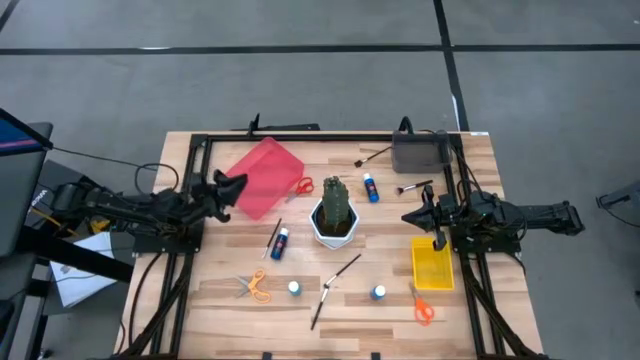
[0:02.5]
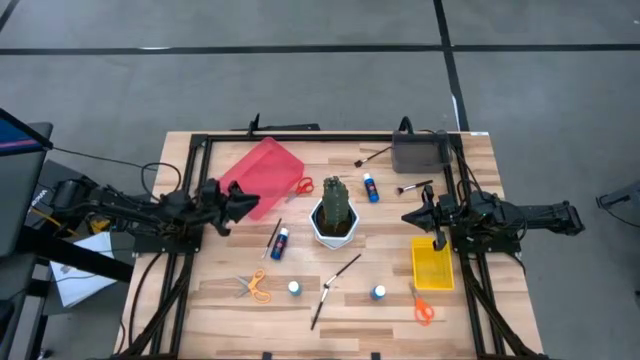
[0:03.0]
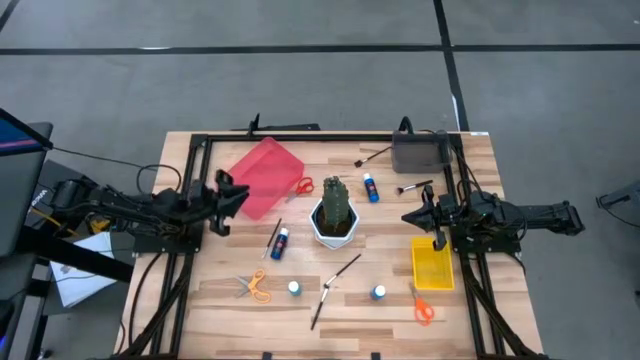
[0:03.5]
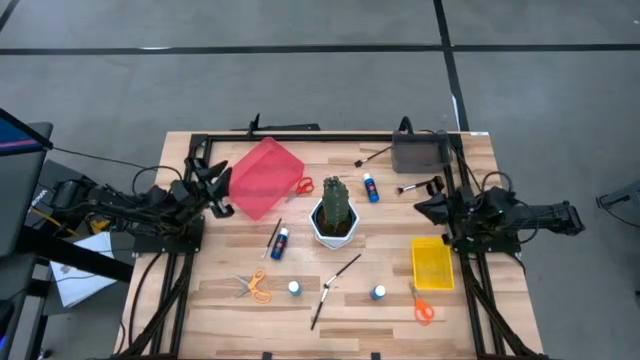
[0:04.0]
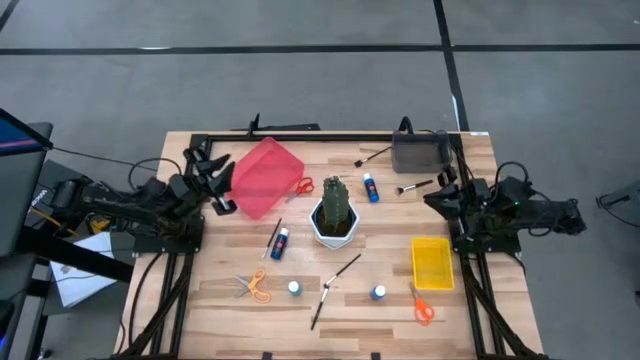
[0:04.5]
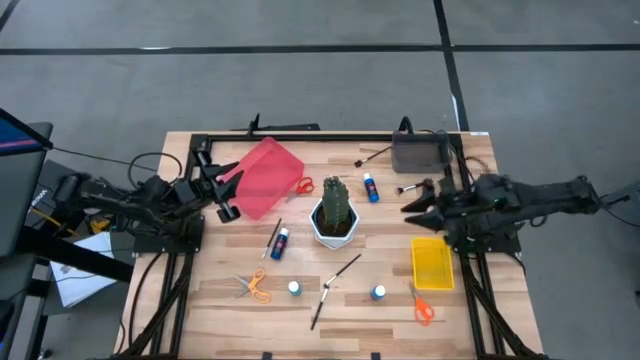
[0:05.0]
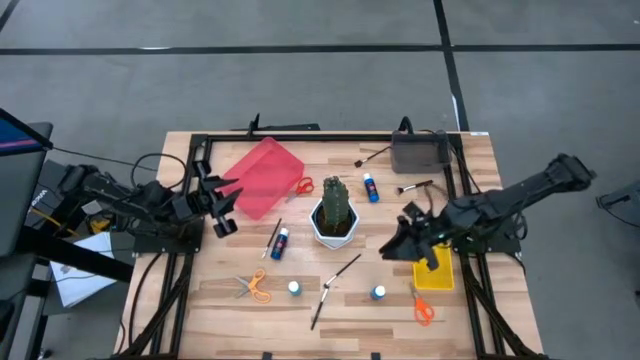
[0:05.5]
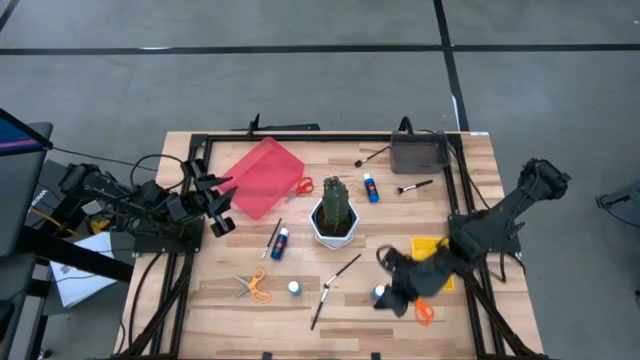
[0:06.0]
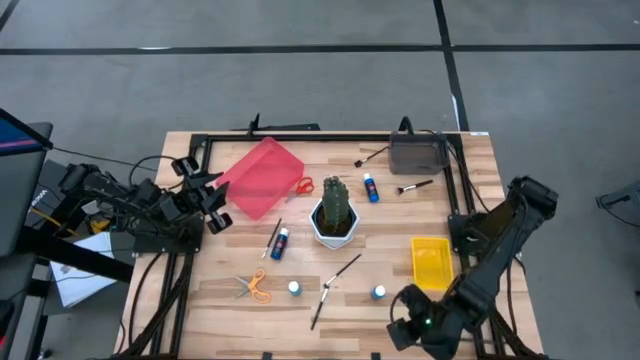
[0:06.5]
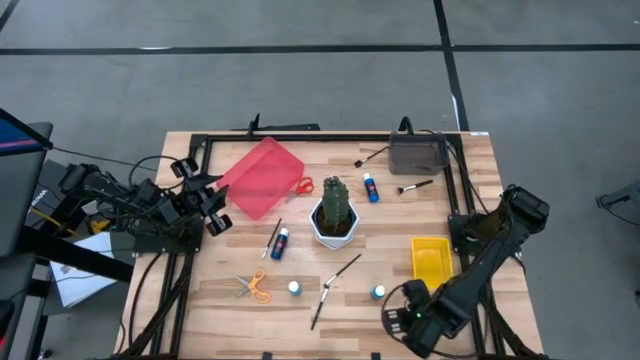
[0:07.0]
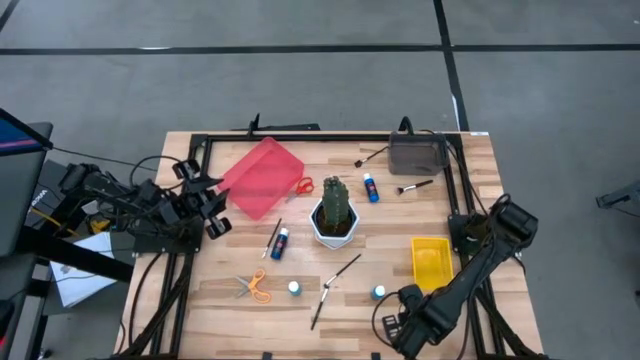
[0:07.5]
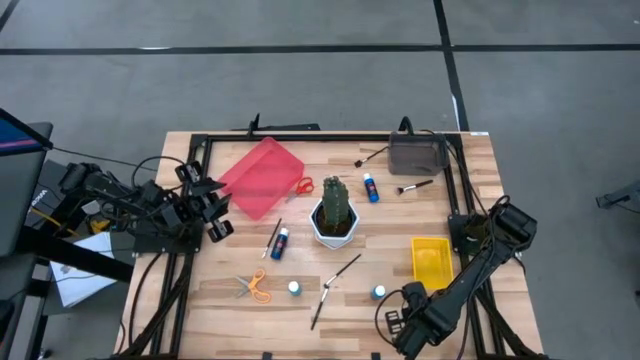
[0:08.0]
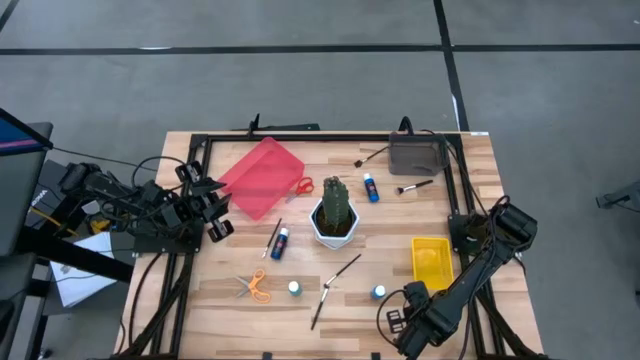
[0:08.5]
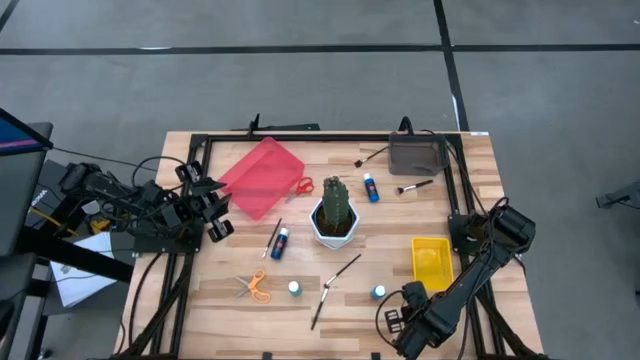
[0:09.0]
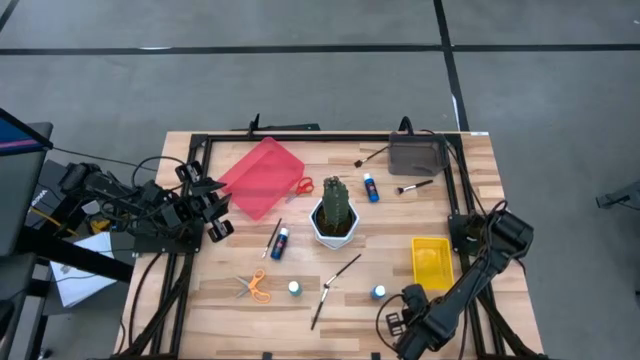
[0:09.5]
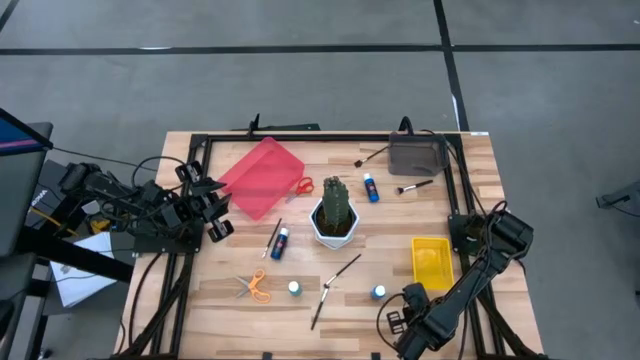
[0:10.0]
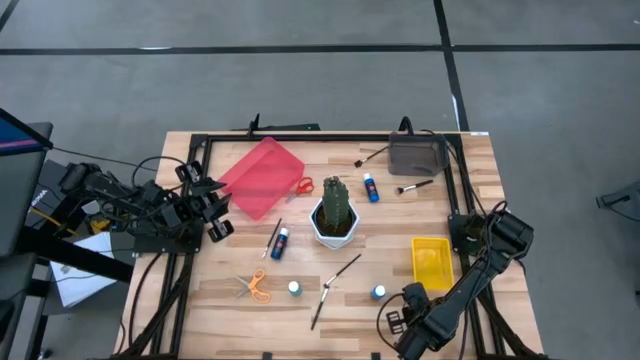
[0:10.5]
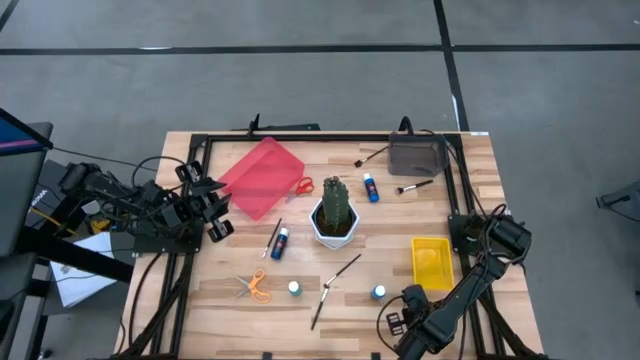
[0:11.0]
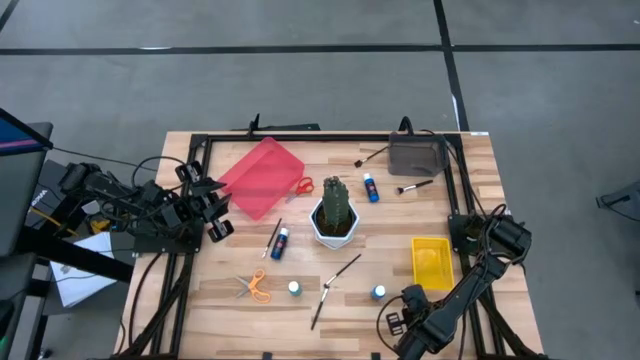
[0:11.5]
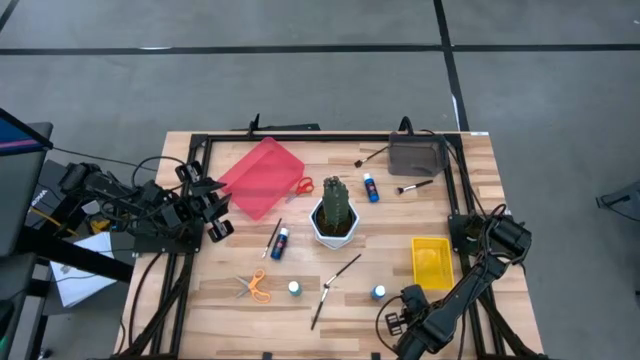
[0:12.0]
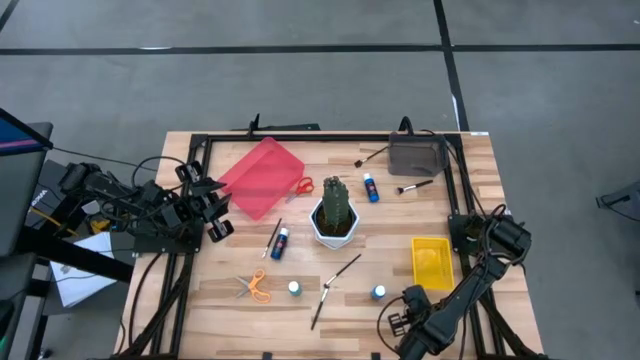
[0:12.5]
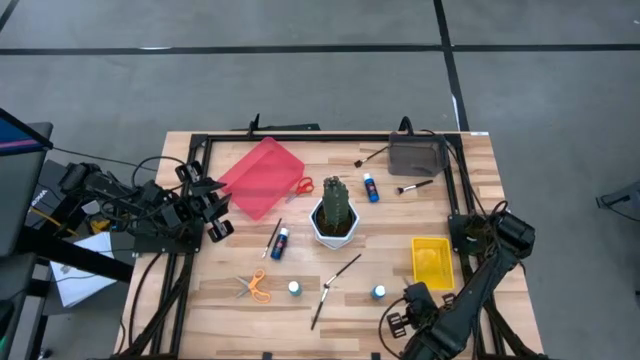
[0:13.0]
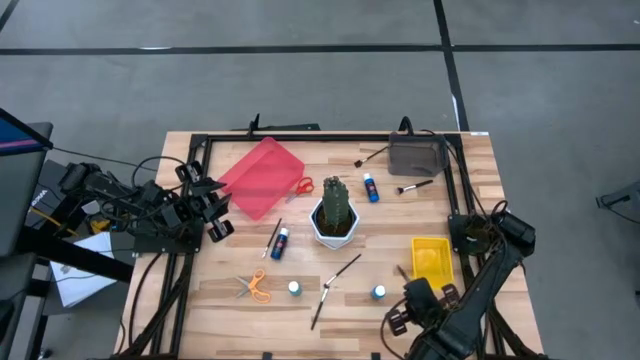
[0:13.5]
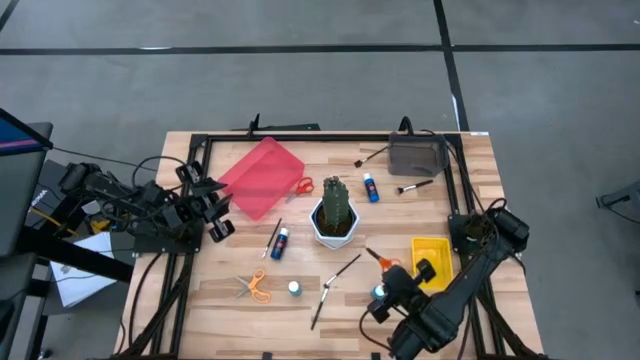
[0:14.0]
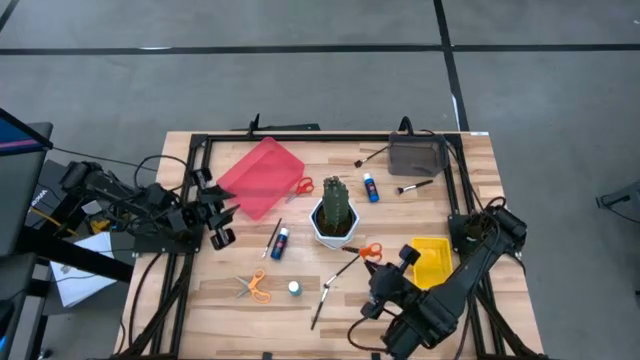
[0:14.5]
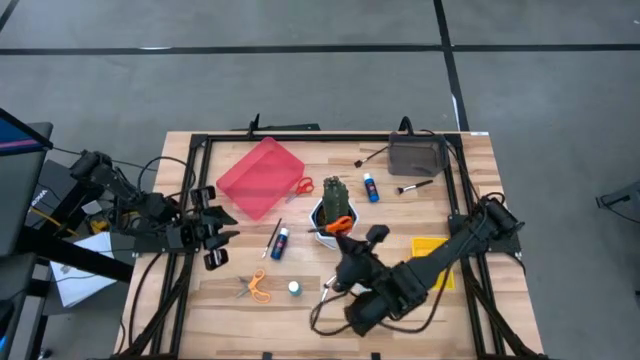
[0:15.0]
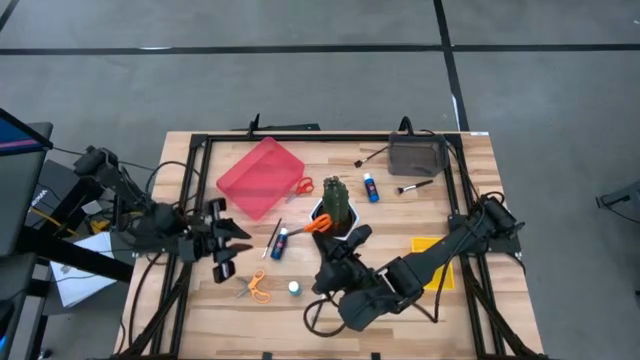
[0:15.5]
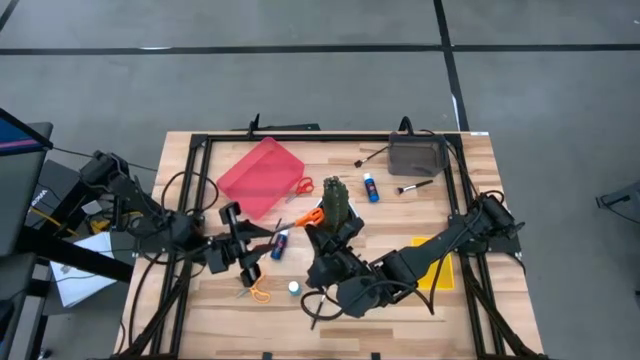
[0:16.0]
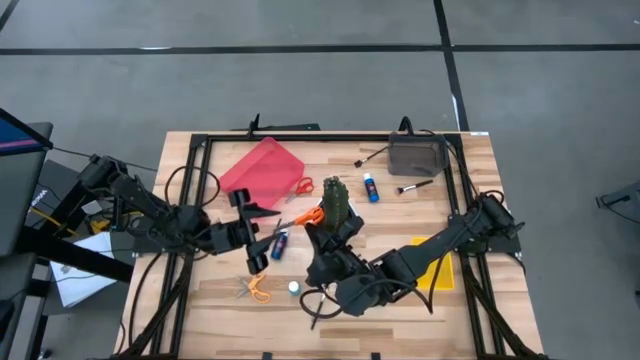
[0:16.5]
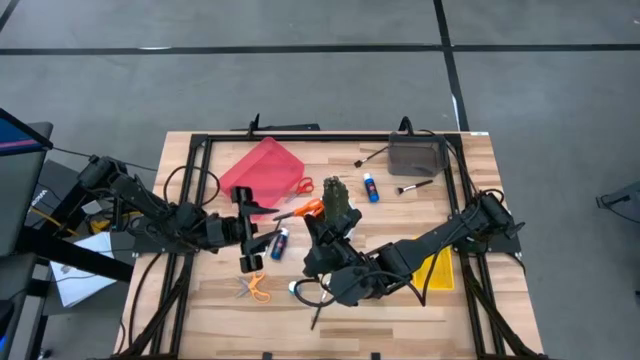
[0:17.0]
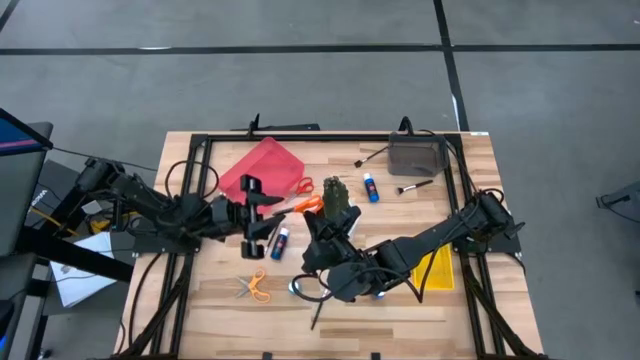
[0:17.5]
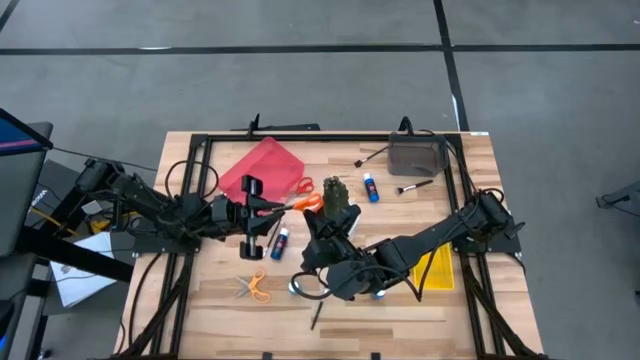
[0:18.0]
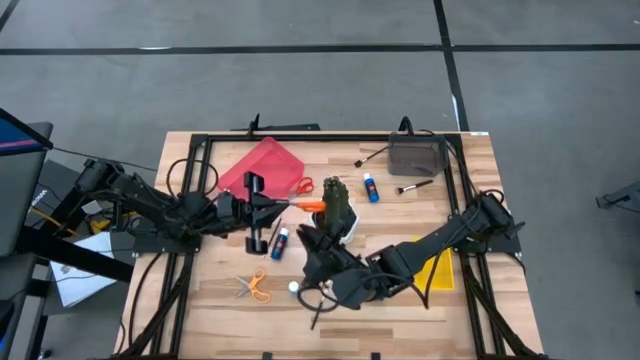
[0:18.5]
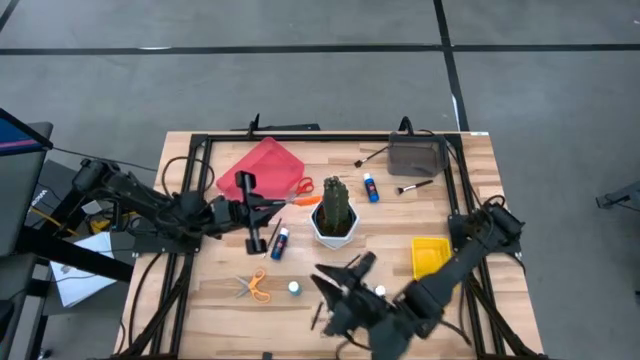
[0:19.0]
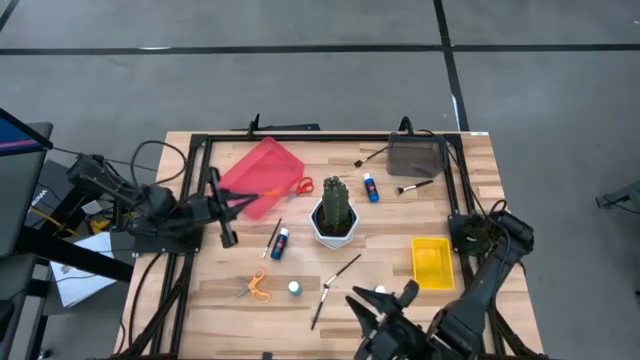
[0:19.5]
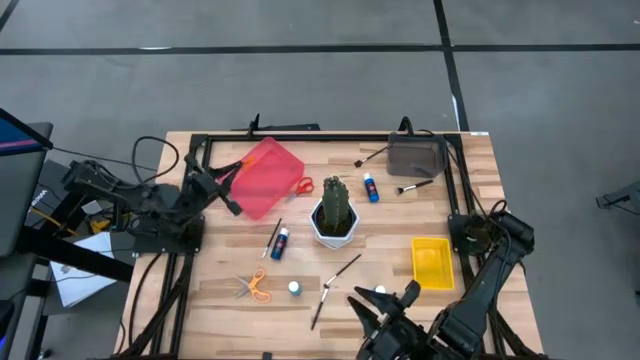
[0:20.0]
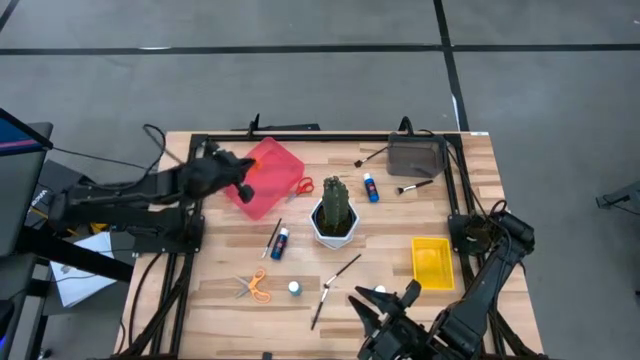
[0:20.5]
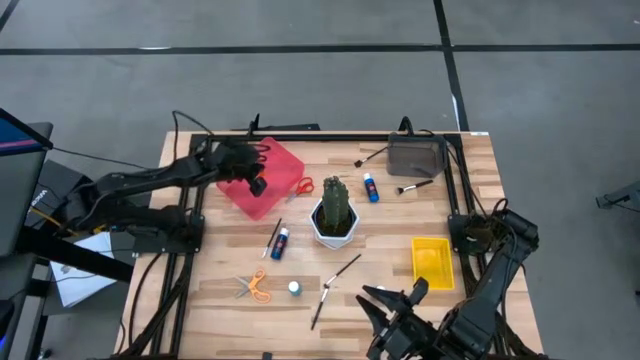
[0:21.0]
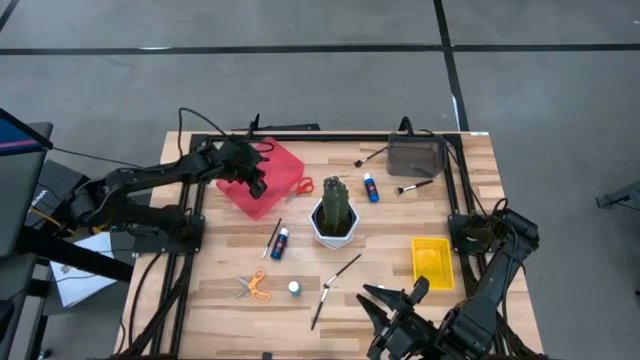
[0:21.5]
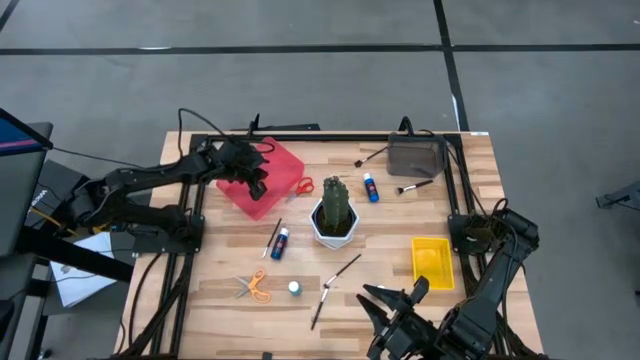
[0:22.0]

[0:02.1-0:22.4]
Task: Pick & Place Paint Supplies
Put the orange scissors into the pink bin
